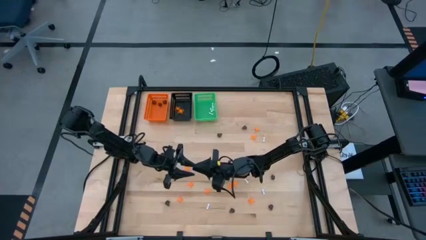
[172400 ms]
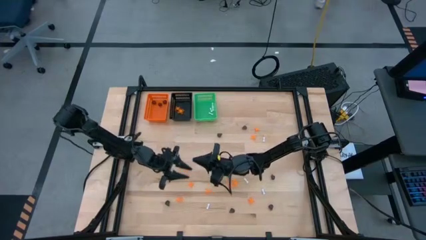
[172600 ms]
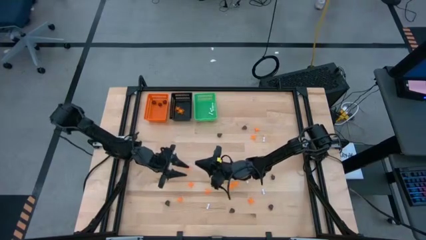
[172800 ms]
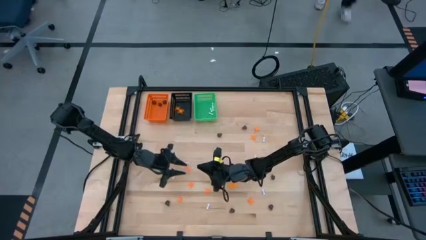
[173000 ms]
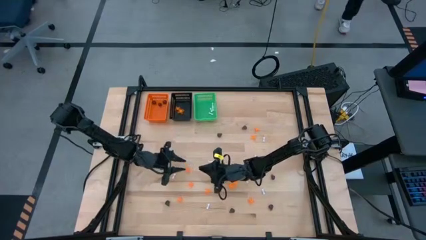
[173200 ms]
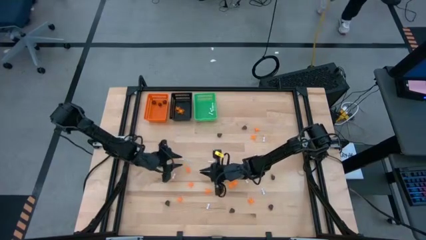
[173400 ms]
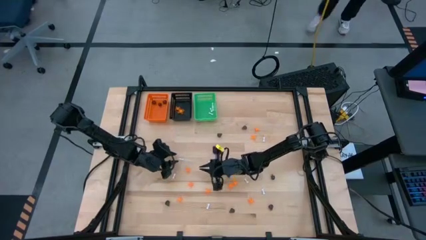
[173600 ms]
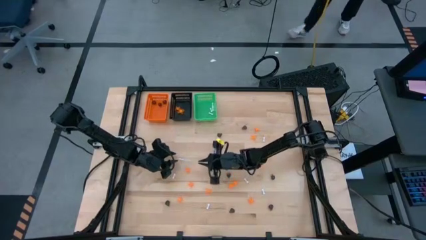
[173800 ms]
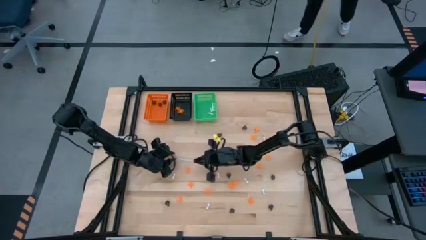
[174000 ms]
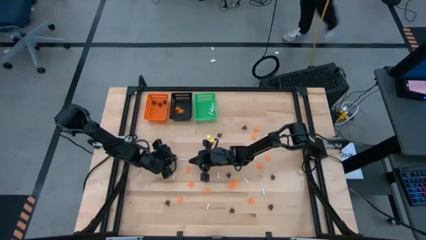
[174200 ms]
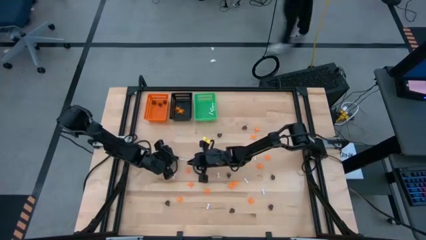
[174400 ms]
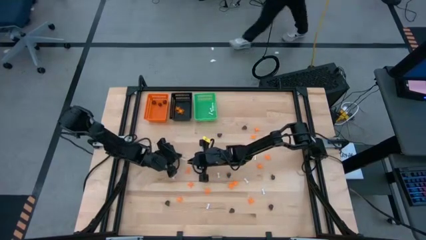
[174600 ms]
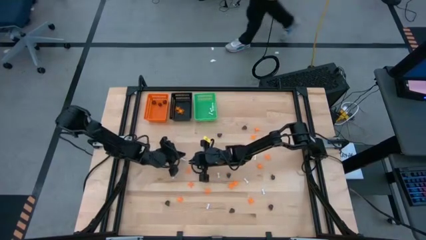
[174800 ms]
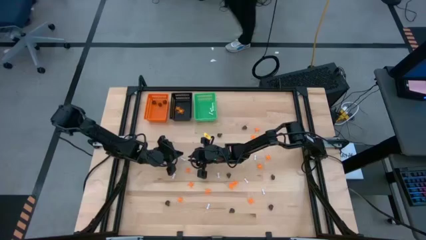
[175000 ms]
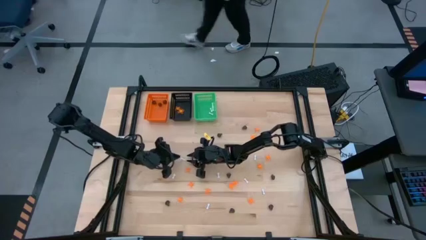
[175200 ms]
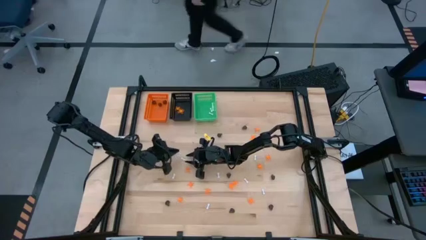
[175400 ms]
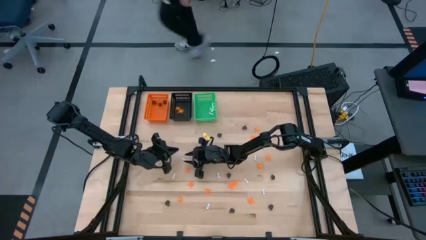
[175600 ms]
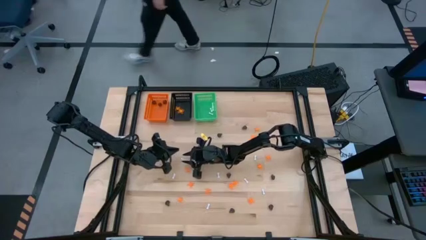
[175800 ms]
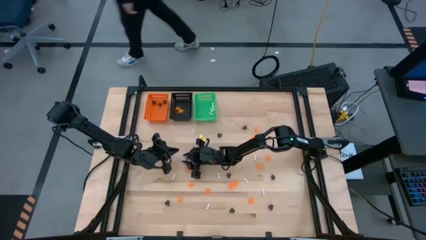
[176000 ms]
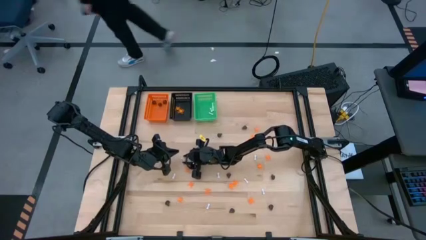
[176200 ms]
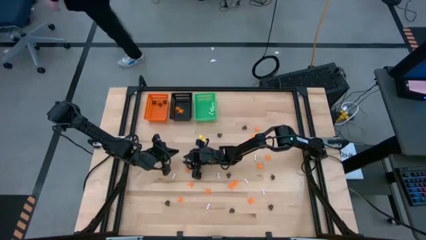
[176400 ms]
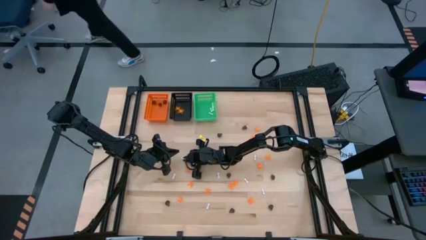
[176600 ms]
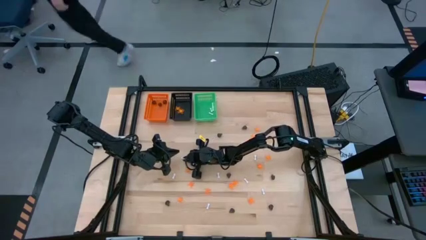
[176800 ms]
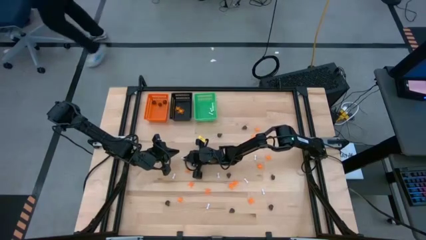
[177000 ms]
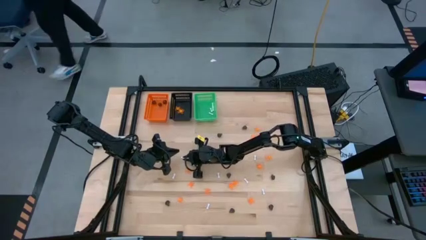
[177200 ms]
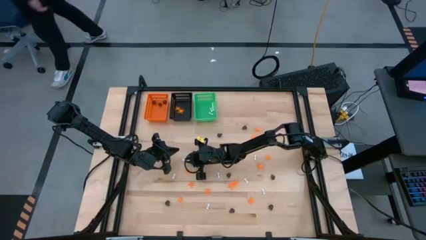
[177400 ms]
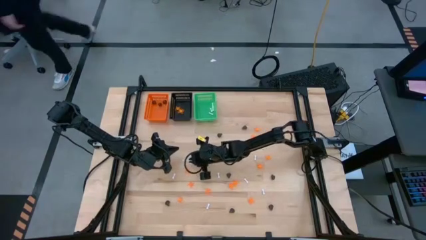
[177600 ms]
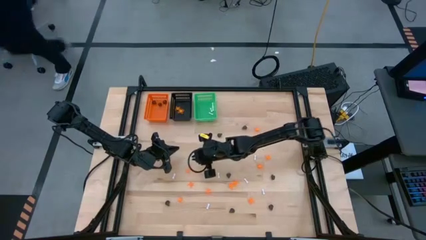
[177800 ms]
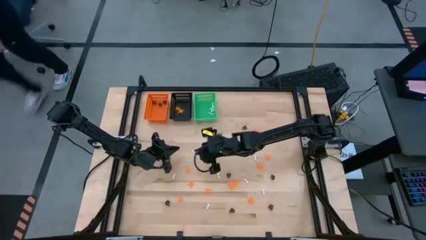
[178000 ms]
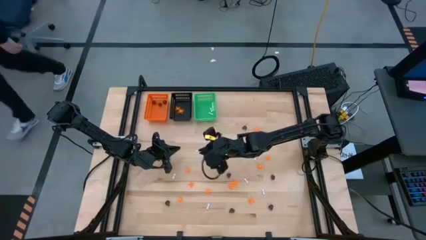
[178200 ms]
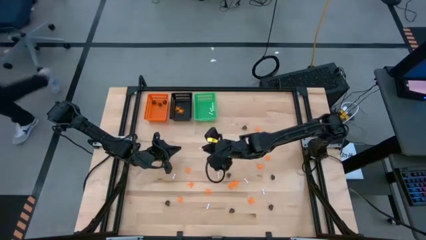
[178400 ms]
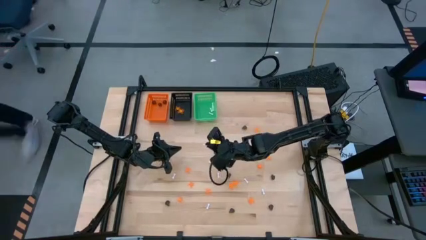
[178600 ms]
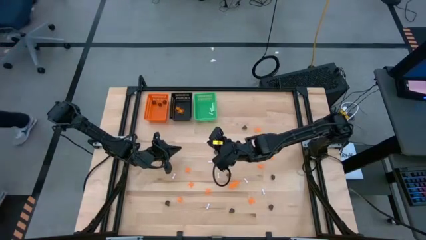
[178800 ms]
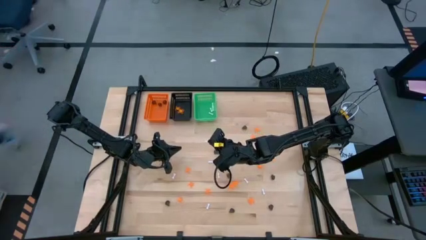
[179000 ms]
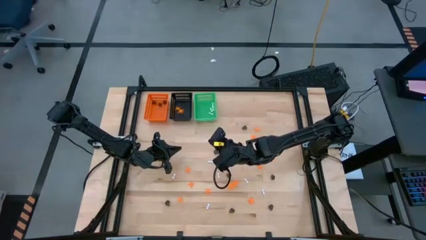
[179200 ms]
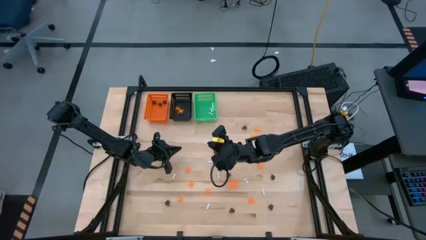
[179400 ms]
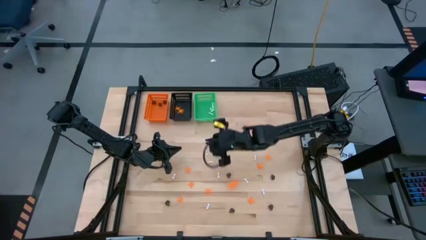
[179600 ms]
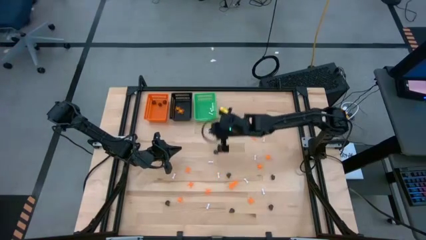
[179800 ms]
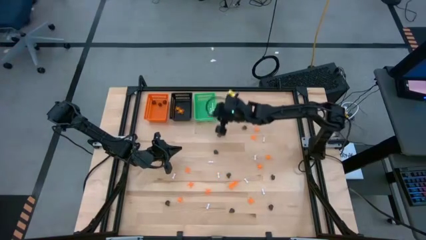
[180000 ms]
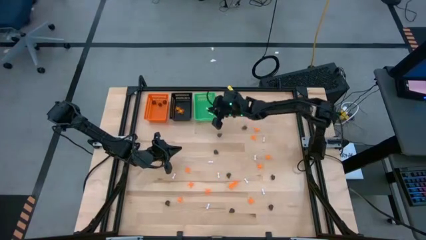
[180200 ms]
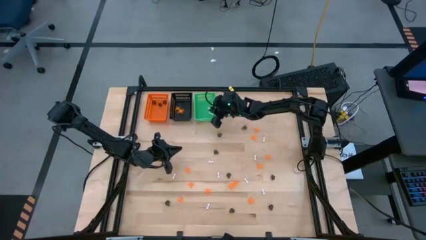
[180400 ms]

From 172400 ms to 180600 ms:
Task: Sort Halloween decoration
Put the white bone toy into the green bin

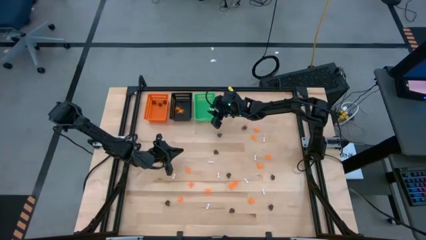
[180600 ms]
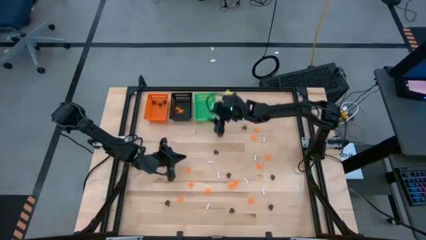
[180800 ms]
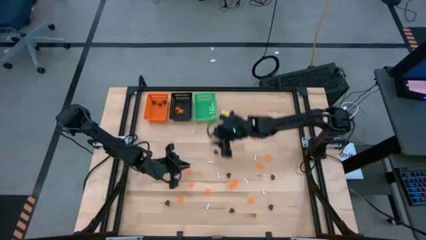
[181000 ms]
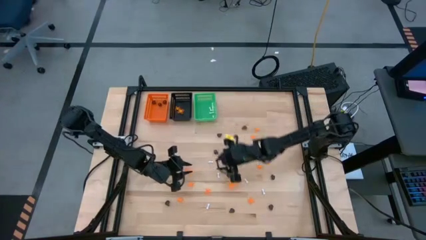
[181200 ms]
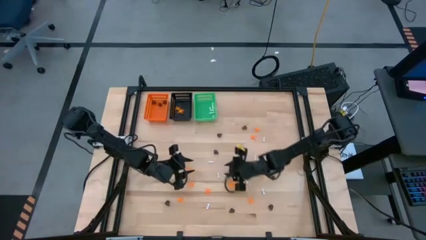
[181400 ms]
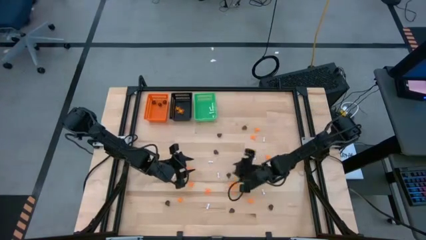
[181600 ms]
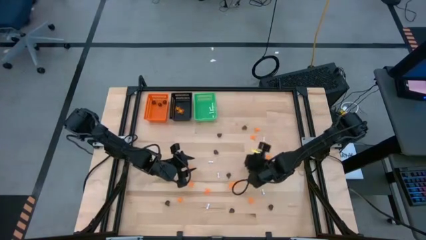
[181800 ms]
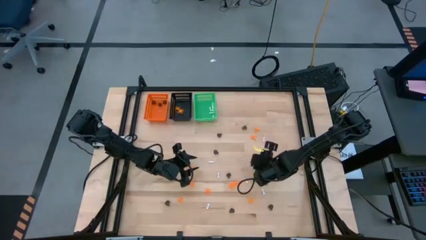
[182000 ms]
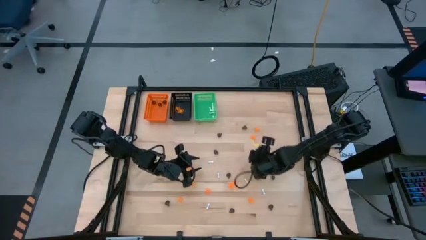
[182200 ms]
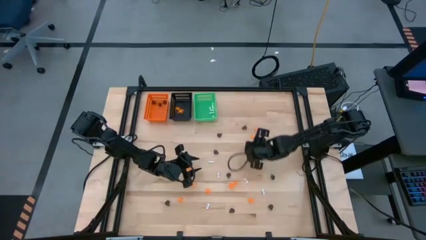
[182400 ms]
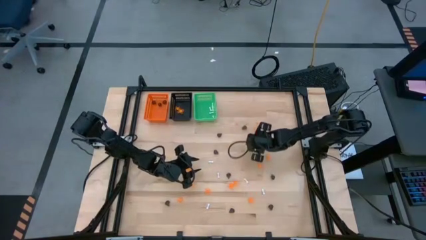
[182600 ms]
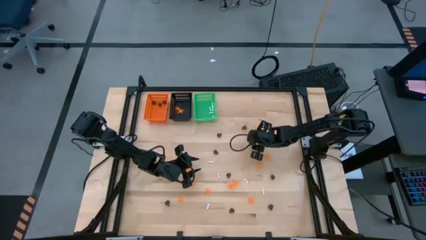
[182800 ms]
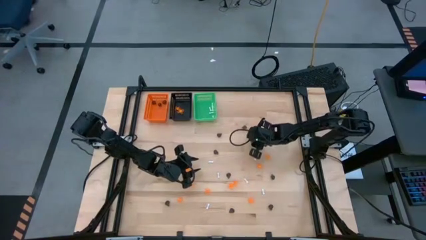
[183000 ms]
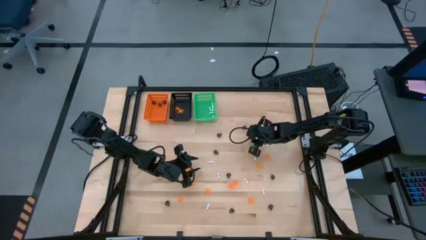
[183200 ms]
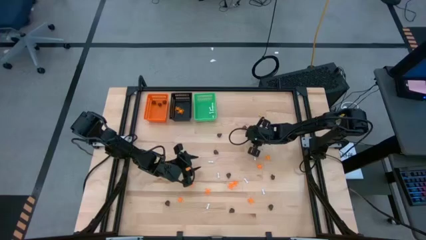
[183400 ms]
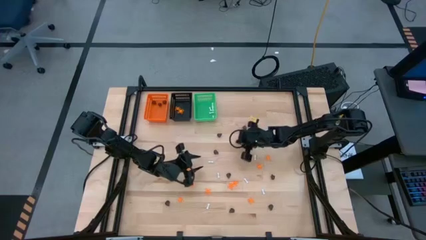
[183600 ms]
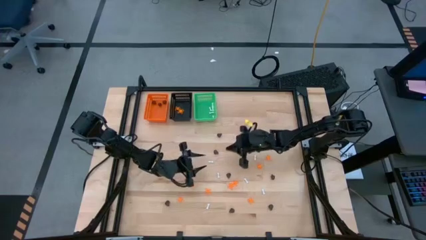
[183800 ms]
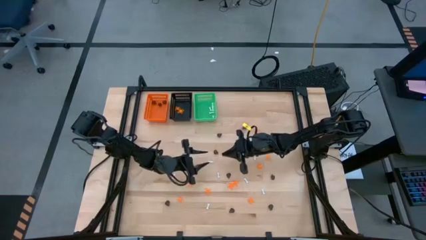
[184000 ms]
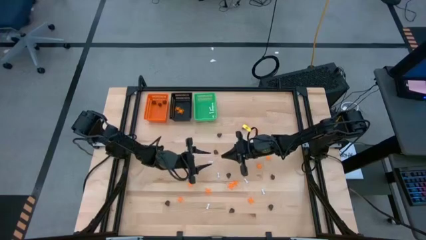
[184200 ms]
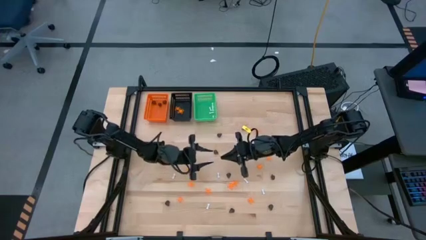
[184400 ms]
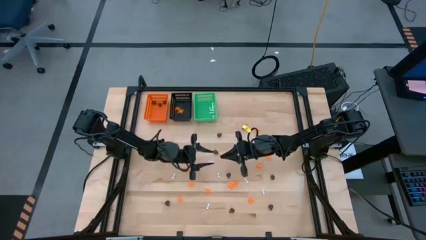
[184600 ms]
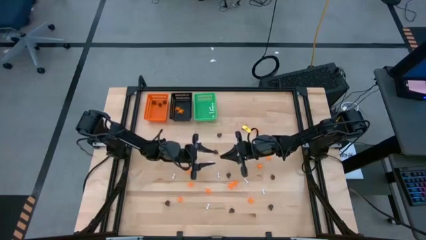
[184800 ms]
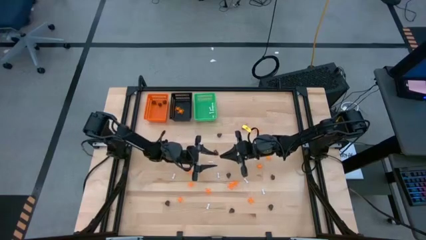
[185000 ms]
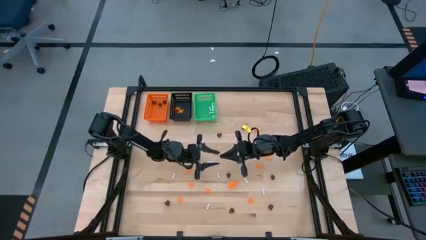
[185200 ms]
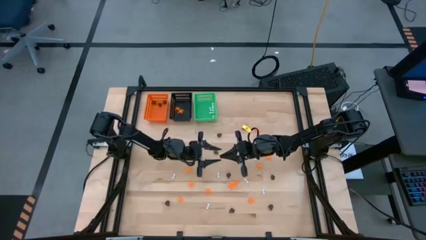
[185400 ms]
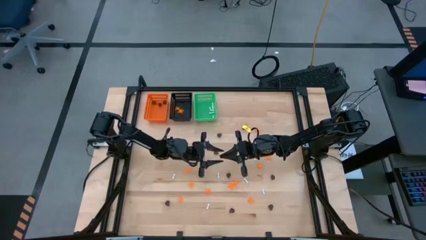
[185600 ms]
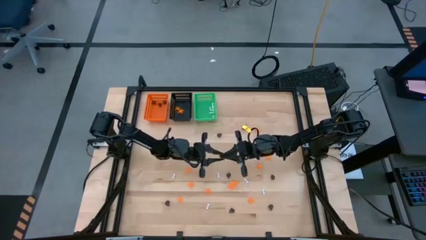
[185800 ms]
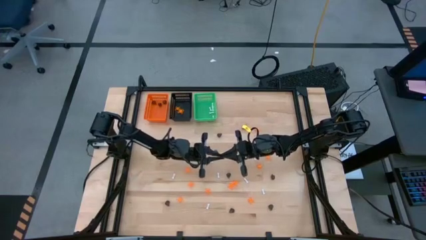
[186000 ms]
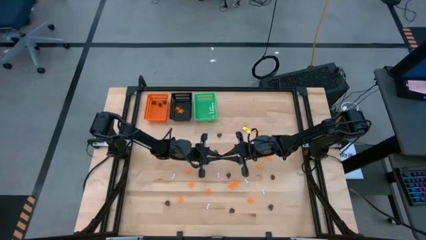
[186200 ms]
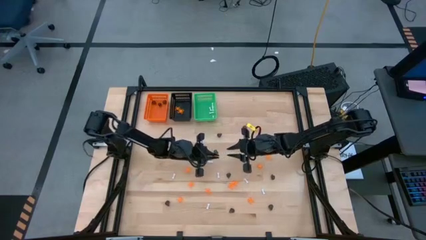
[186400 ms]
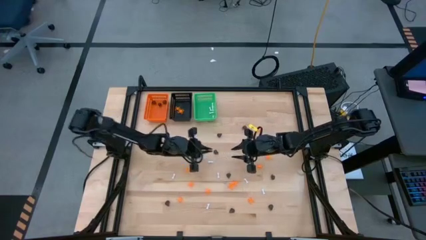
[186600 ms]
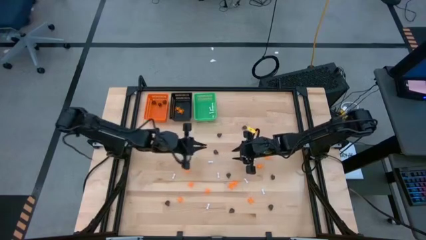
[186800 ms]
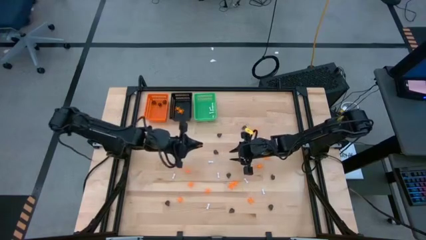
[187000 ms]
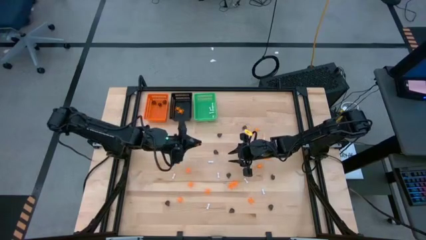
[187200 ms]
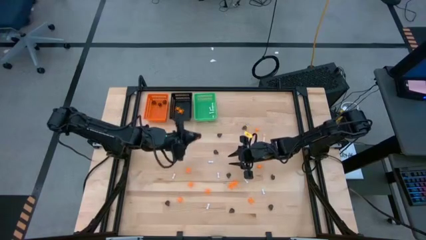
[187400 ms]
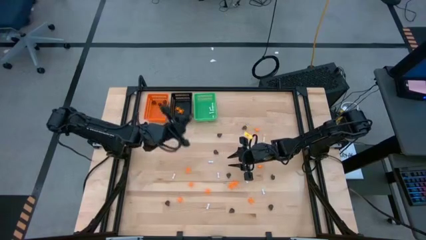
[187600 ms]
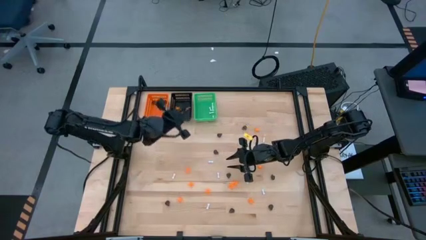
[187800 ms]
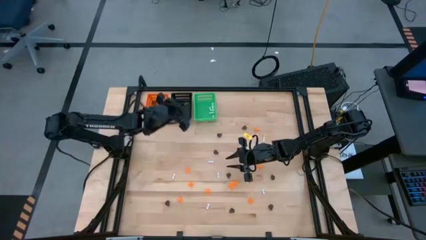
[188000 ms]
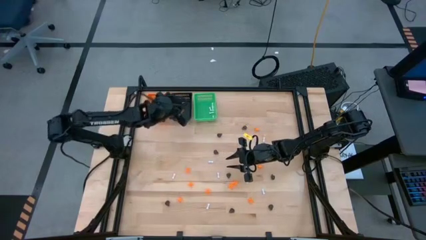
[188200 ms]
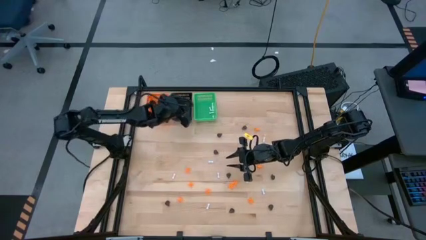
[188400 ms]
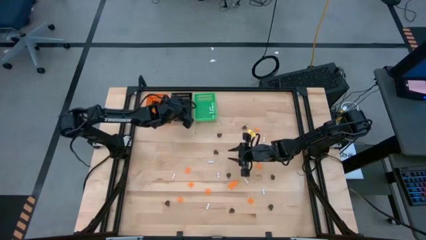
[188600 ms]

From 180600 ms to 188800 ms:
Put the orange spider toy into the black bin
